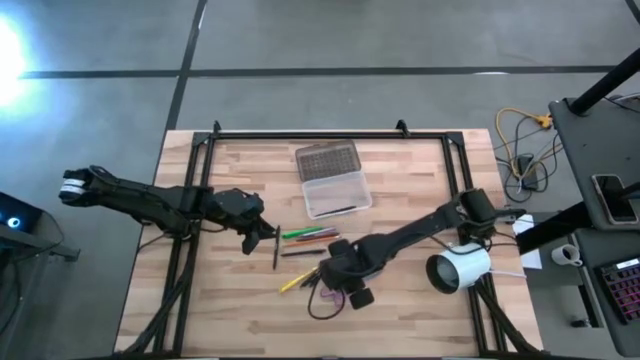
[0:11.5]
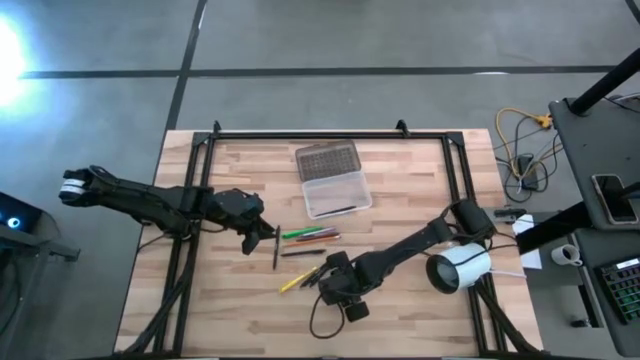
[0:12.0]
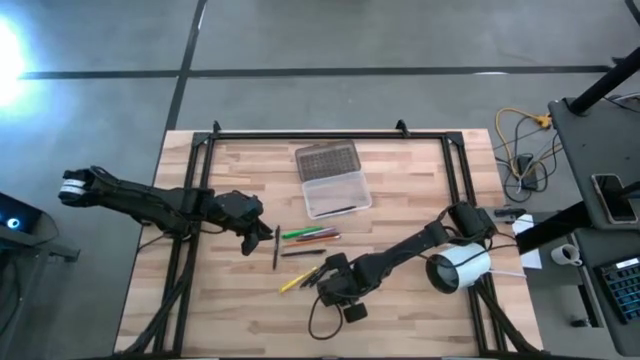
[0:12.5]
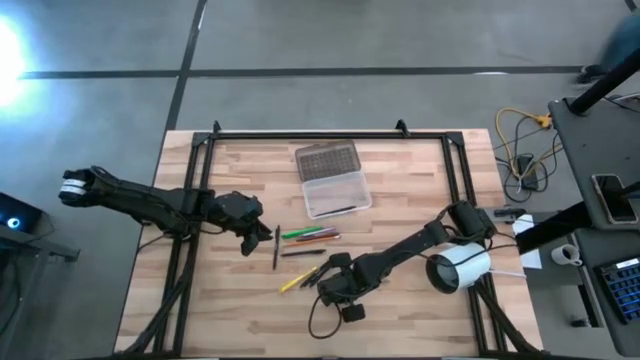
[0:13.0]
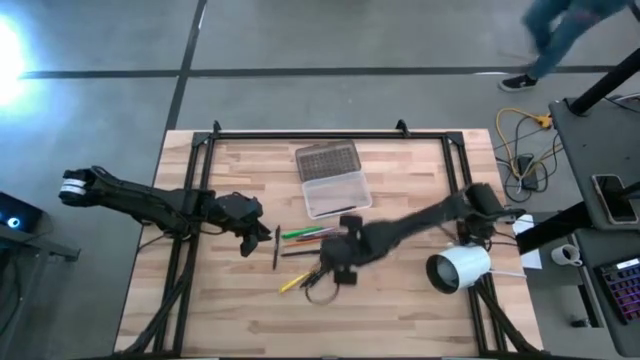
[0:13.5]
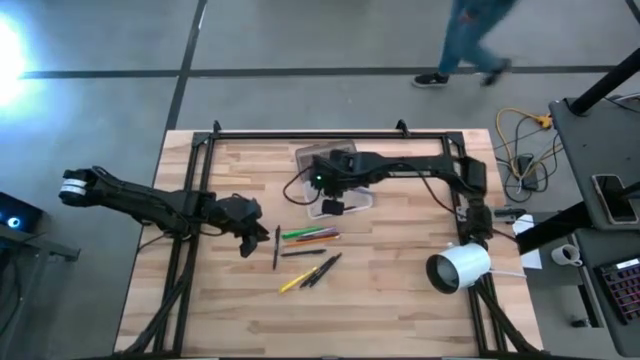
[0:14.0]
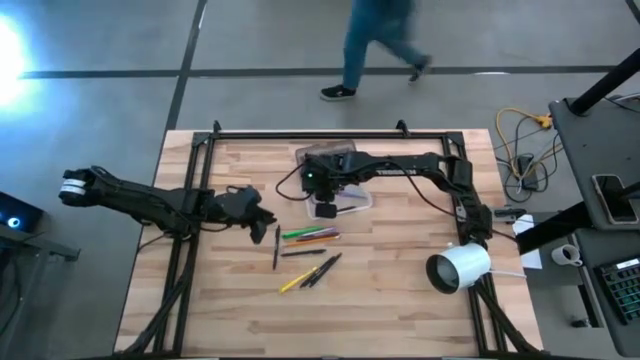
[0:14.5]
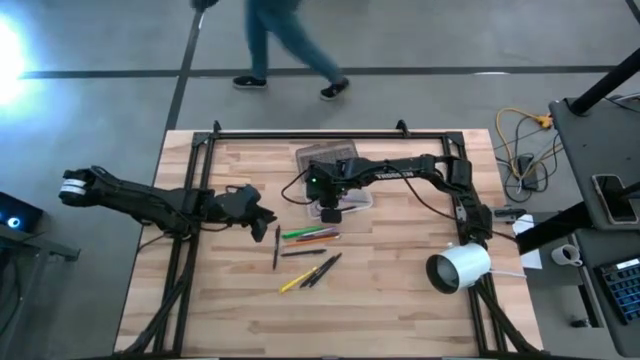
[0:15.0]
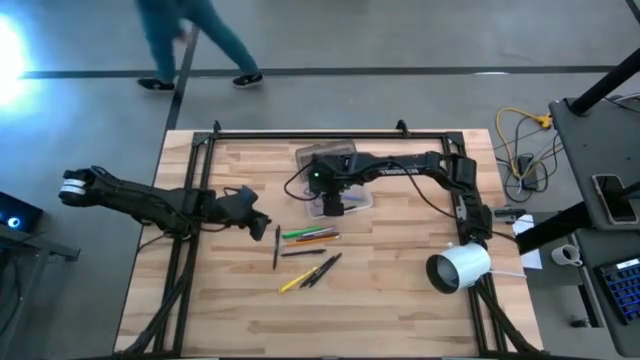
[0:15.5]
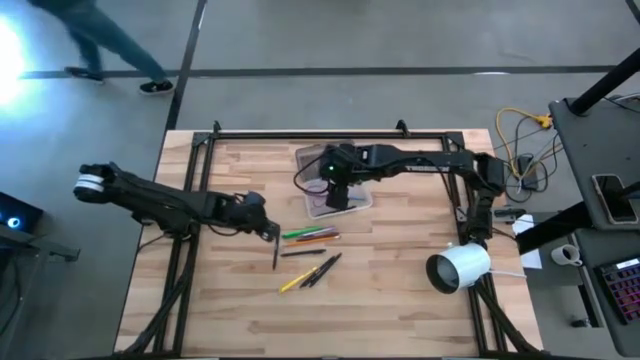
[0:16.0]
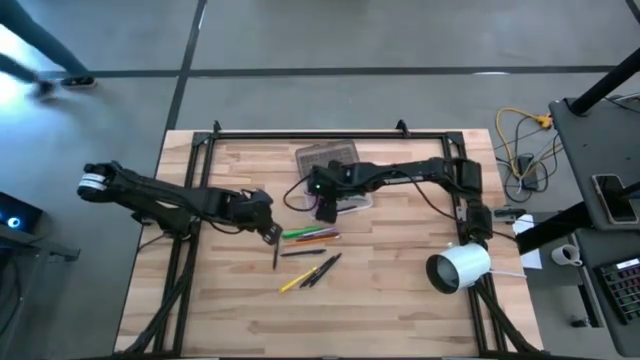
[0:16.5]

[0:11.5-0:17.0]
Task: Pick & place school supplies into a supply box
Put the purple scissors into the black supply box

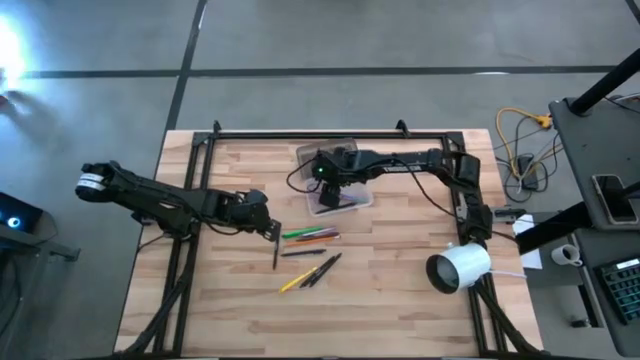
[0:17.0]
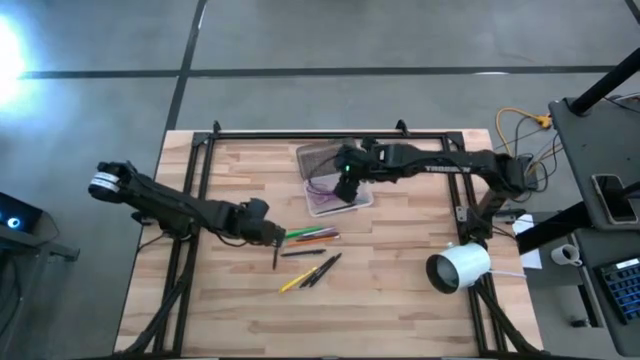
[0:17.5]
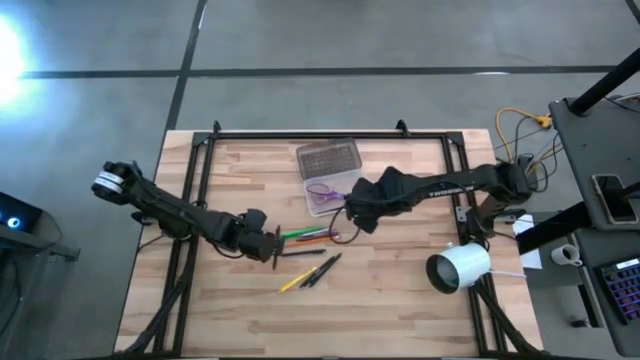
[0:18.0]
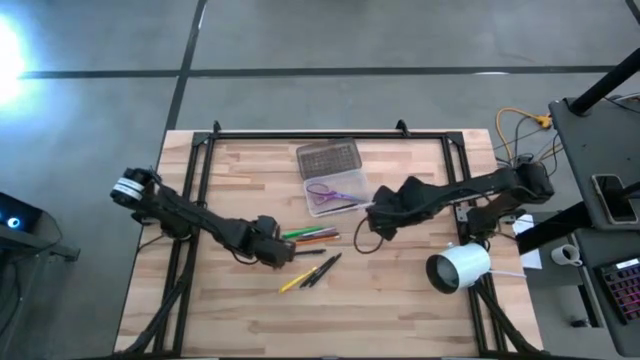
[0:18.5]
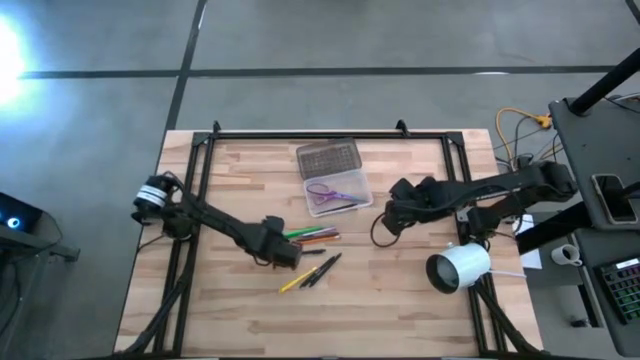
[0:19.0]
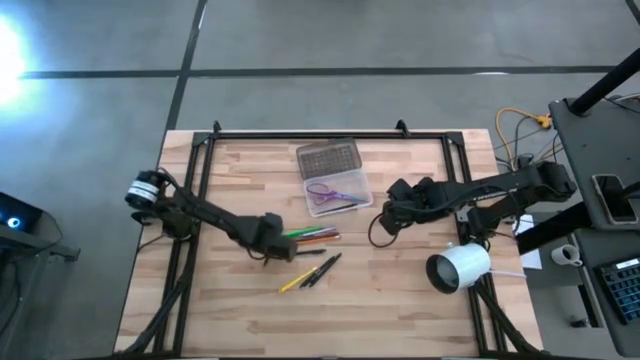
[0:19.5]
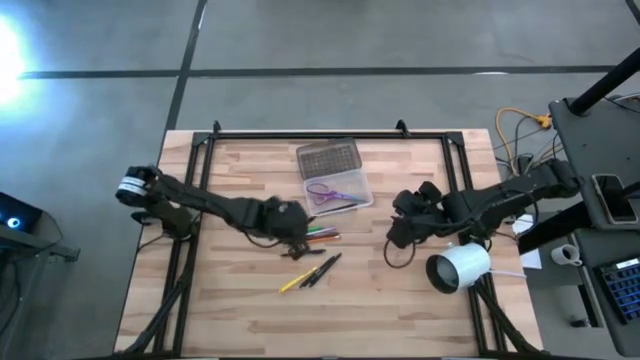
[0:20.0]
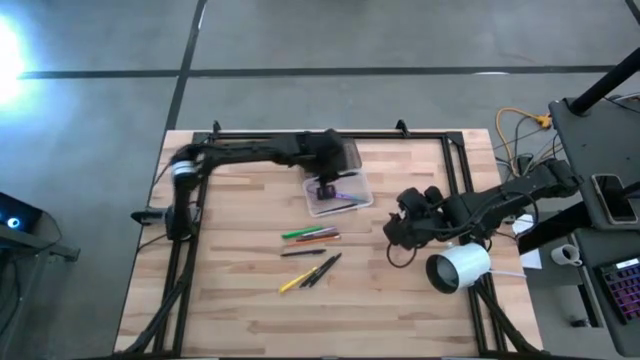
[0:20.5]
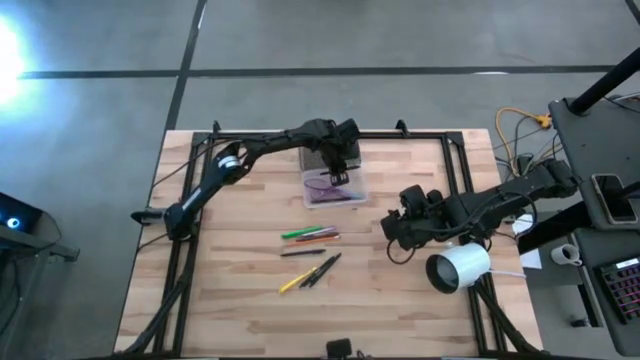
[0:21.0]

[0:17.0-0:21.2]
Put the black pen into the black supply box

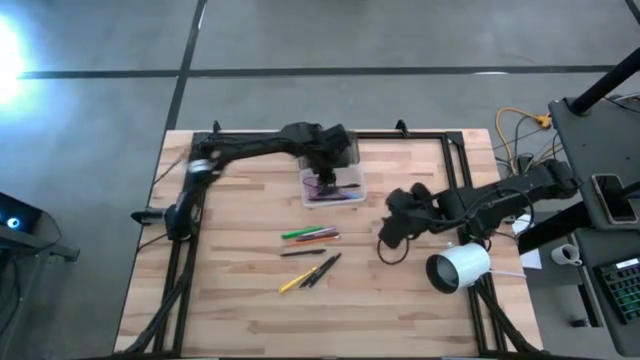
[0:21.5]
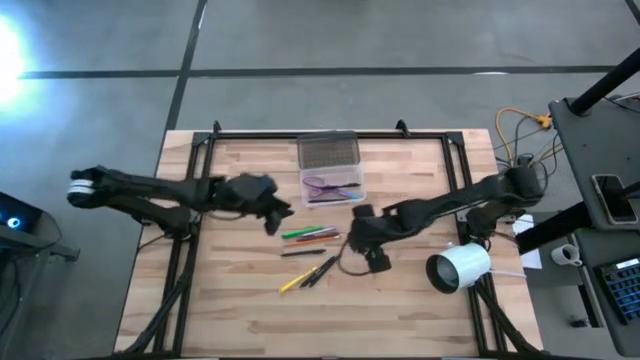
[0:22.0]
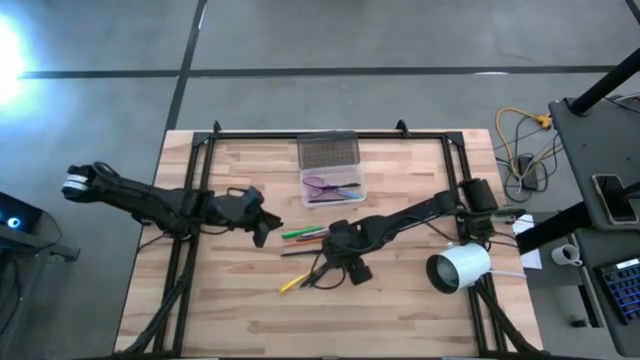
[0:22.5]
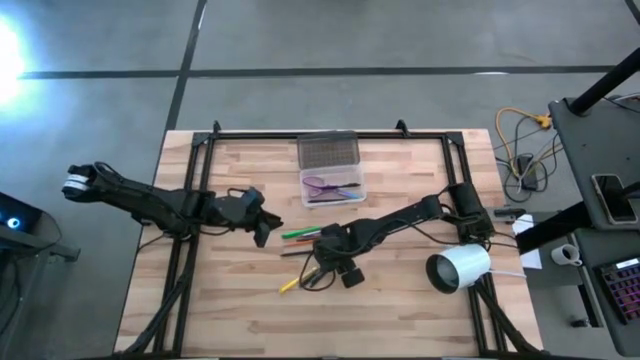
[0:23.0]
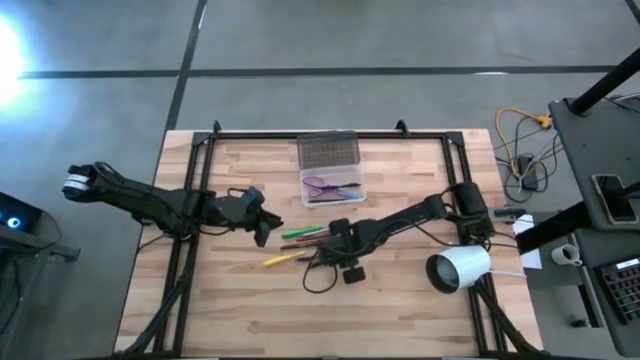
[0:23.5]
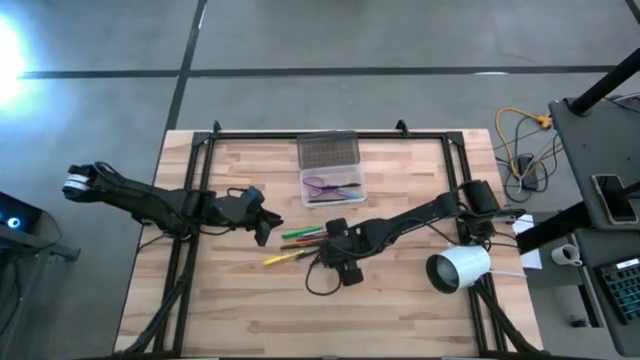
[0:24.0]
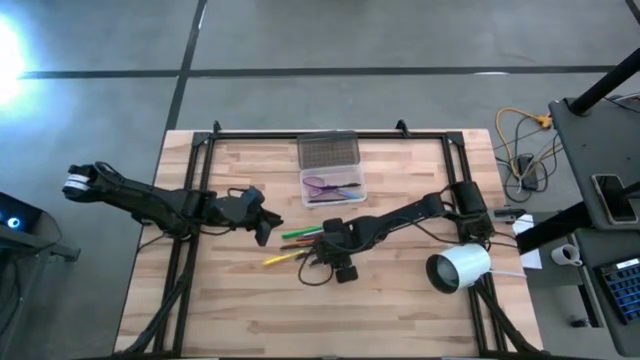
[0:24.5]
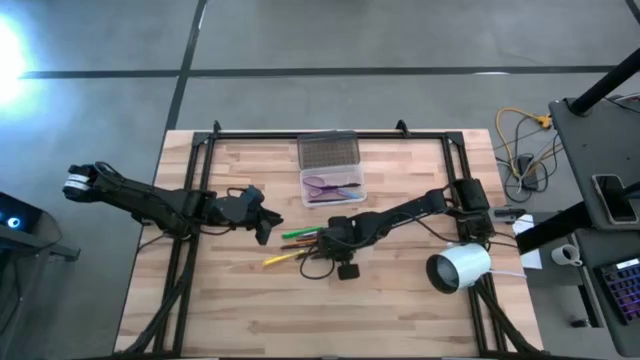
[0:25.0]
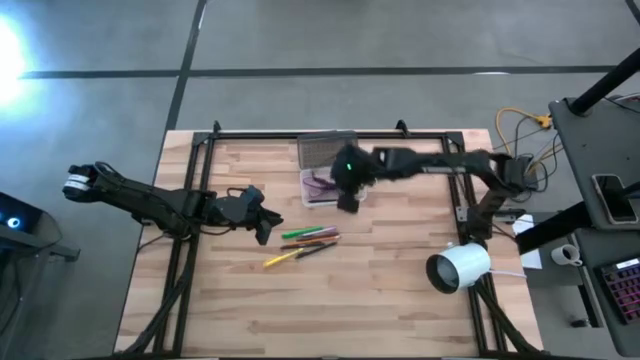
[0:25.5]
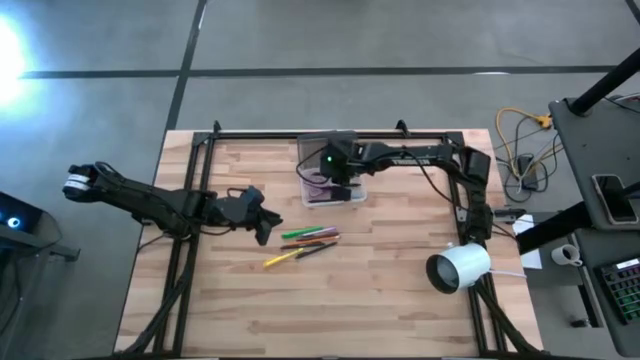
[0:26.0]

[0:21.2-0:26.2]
Put the black pen into the black supply box

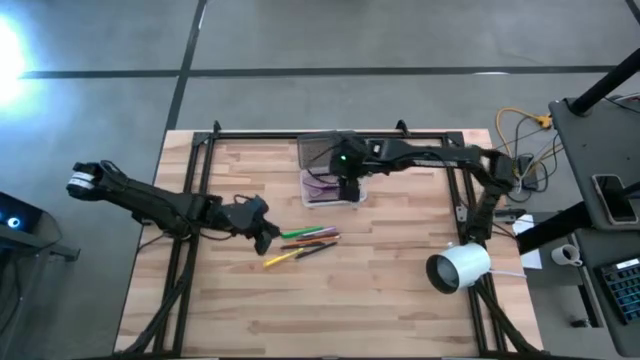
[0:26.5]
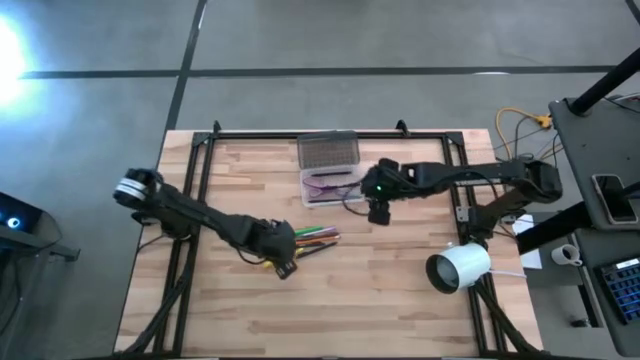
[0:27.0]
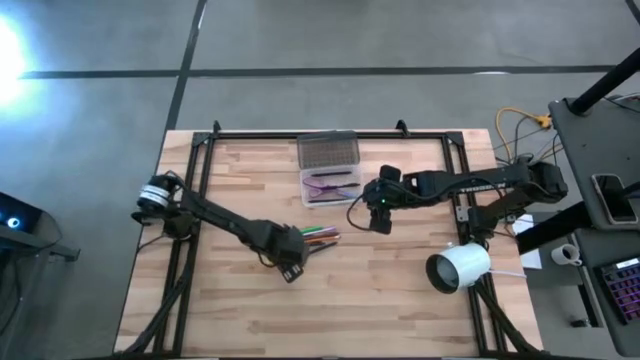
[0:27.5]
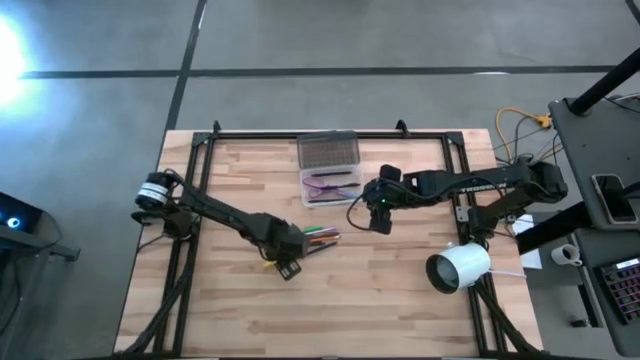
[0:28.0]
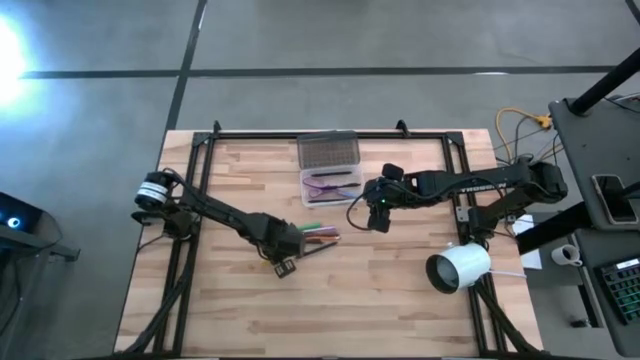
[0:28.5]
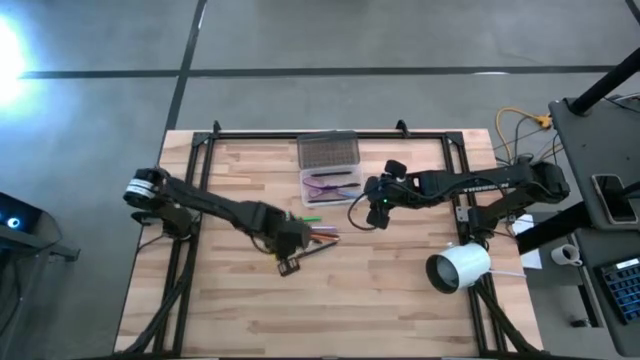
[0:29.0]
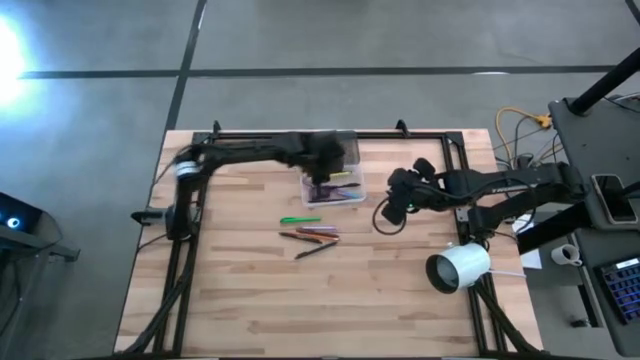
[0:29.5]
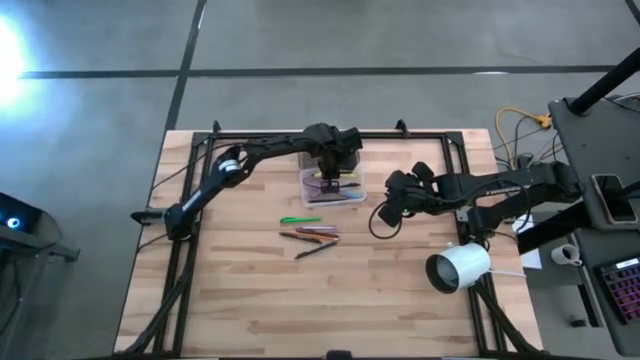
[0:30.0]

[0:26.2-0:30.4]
Put the yellow pen into the black supply box

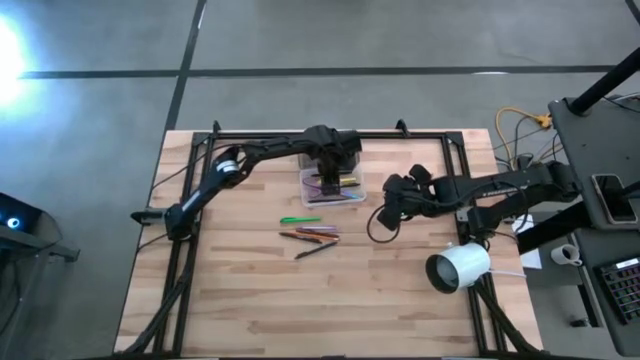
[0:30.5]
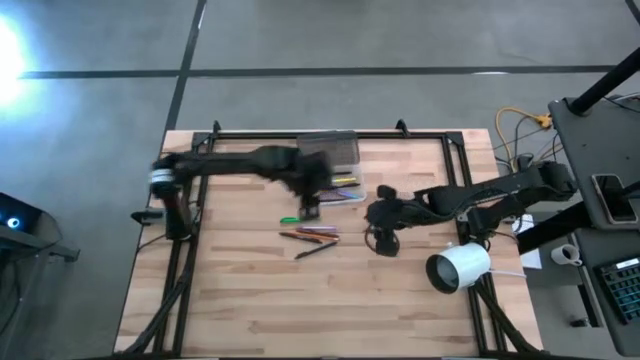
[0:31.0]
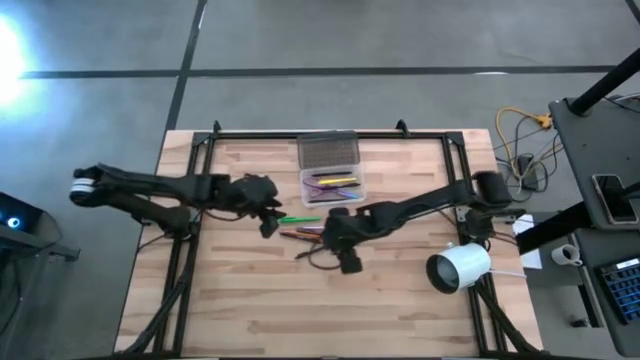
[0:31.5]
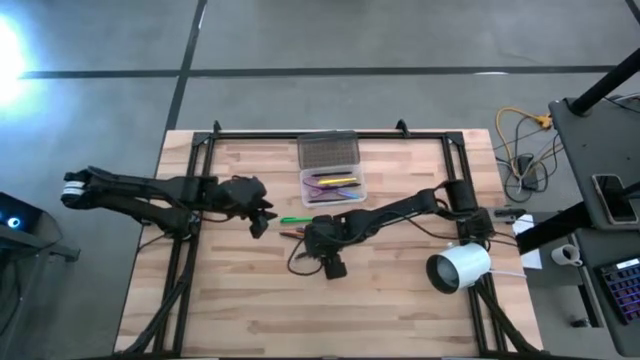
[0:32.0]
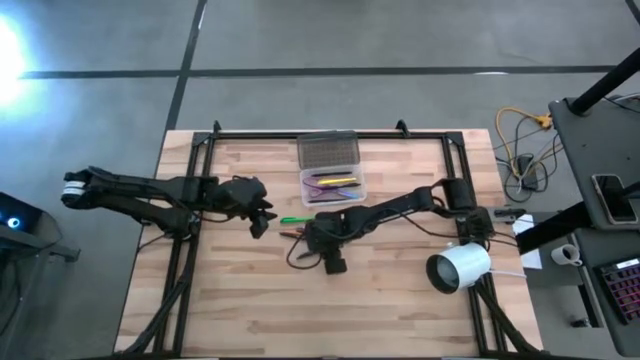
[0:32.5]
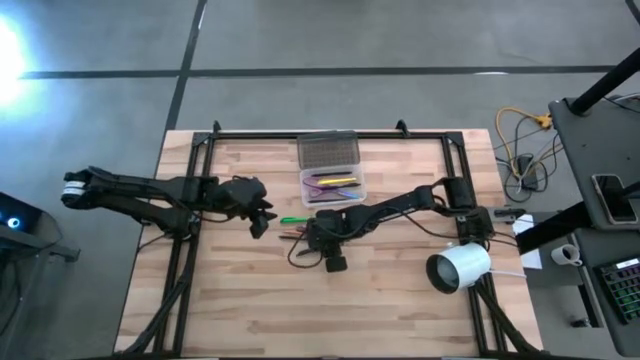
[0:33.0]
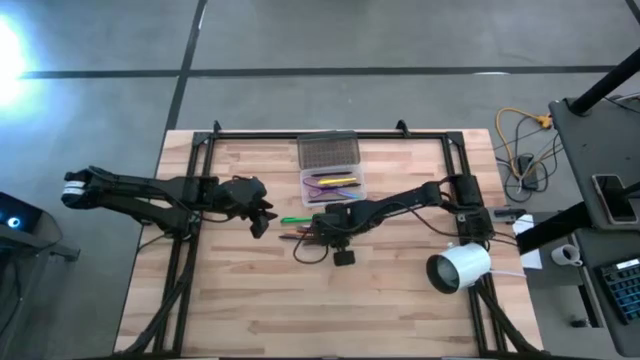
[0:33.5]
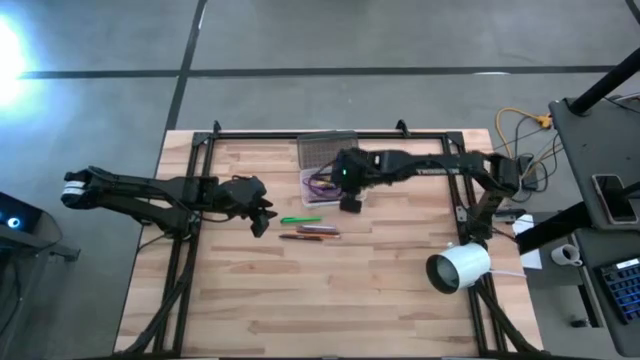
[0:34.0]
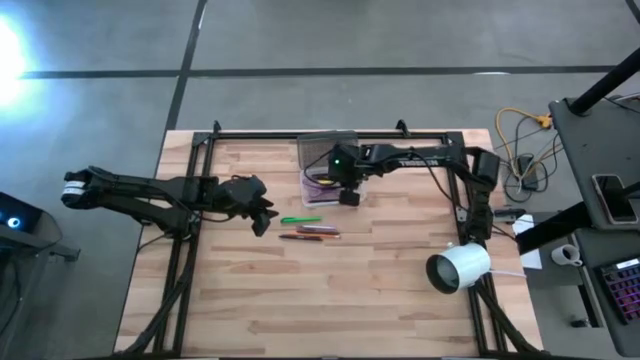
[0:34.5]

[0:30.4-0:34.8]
Put the black pen into the black supply box
